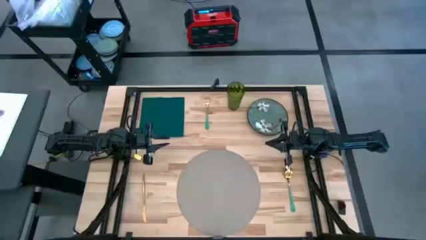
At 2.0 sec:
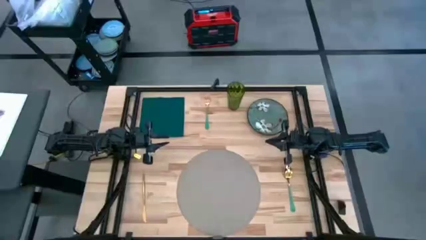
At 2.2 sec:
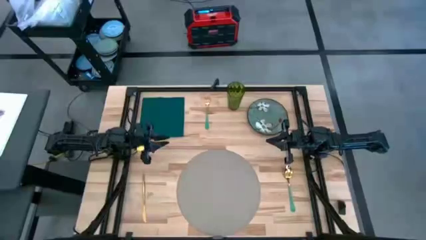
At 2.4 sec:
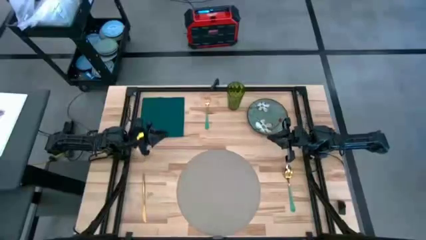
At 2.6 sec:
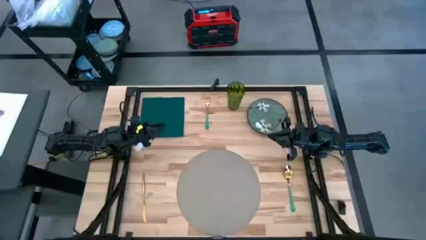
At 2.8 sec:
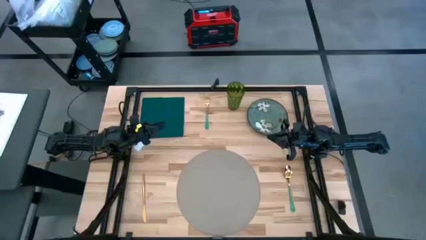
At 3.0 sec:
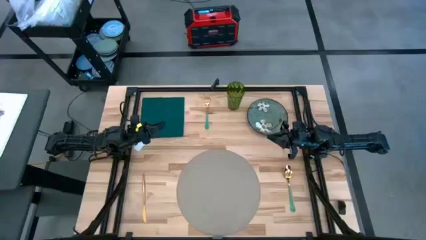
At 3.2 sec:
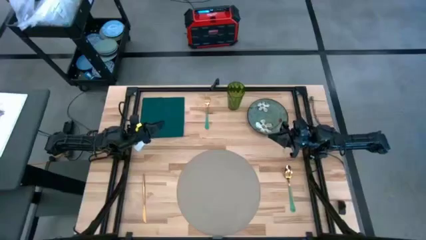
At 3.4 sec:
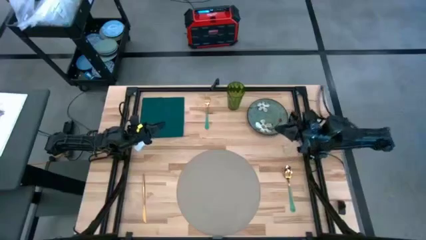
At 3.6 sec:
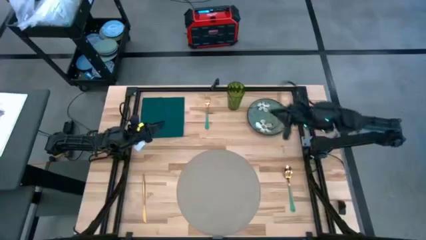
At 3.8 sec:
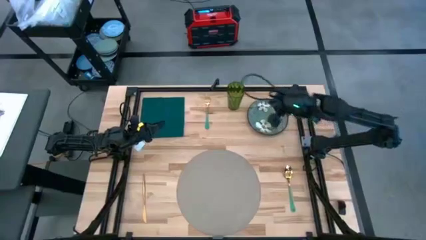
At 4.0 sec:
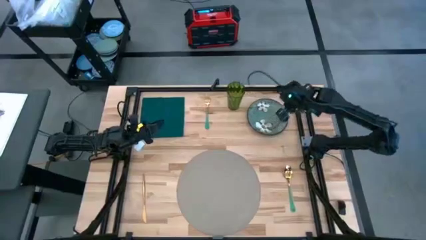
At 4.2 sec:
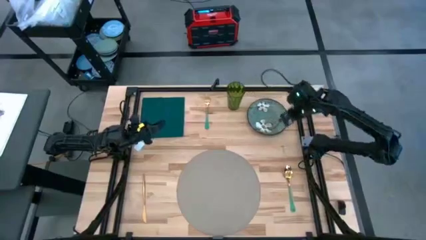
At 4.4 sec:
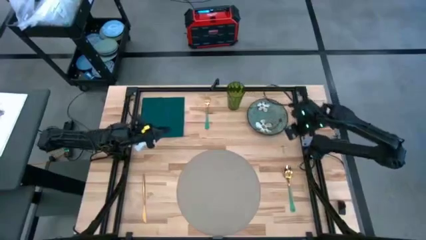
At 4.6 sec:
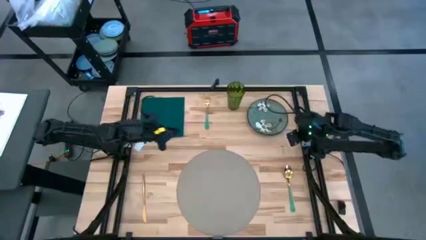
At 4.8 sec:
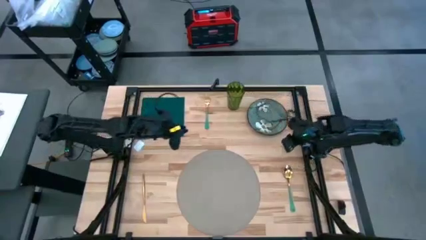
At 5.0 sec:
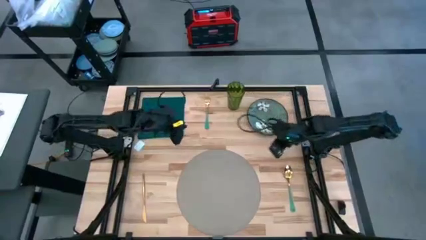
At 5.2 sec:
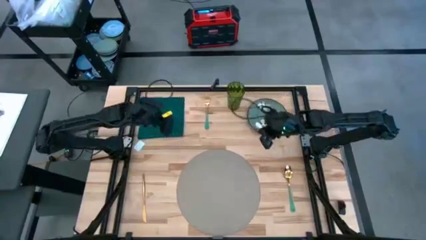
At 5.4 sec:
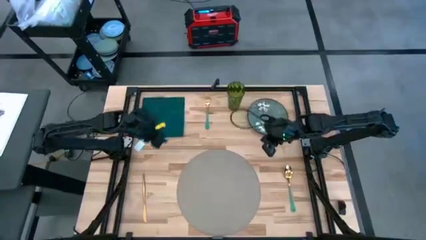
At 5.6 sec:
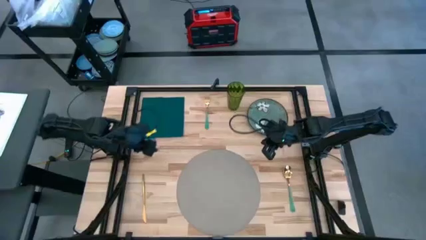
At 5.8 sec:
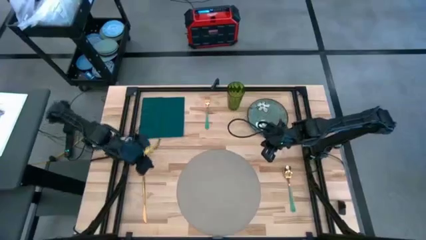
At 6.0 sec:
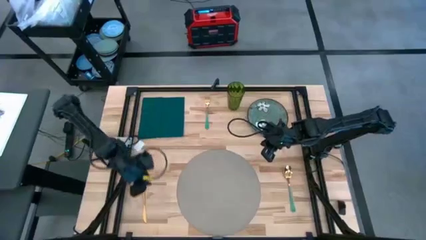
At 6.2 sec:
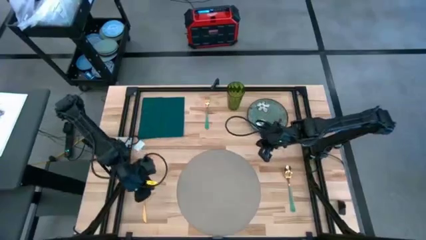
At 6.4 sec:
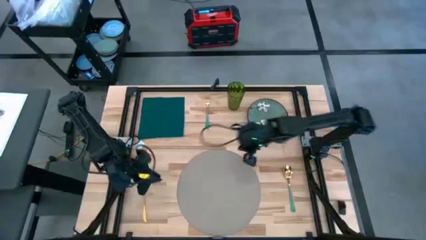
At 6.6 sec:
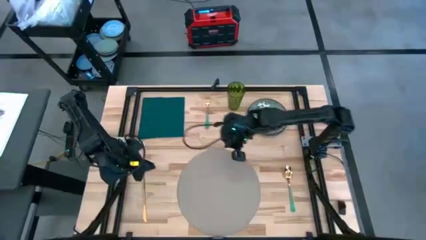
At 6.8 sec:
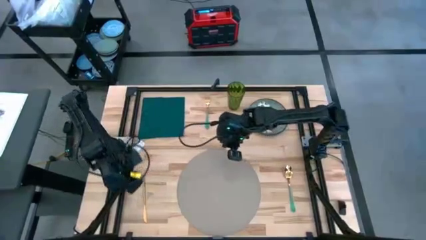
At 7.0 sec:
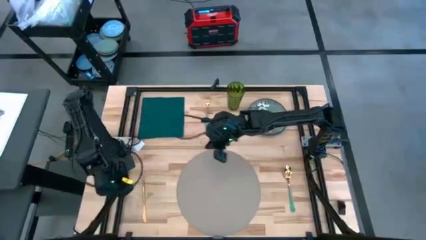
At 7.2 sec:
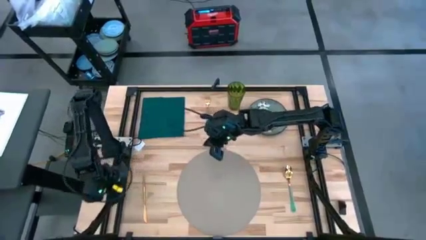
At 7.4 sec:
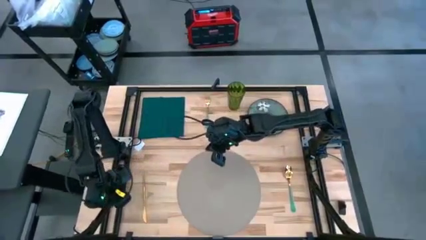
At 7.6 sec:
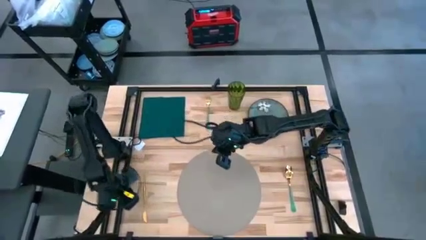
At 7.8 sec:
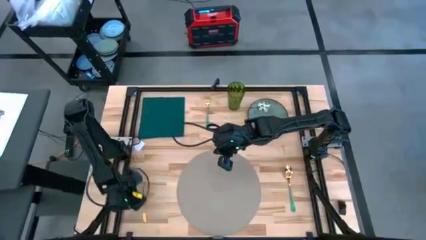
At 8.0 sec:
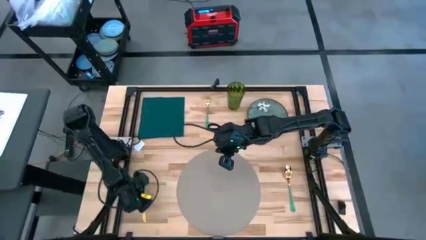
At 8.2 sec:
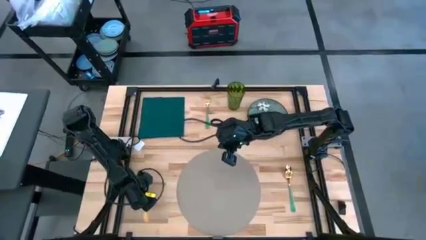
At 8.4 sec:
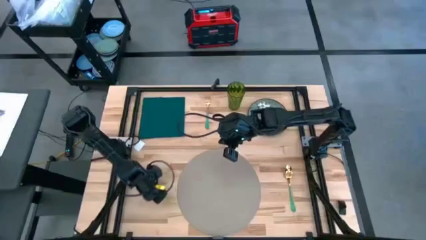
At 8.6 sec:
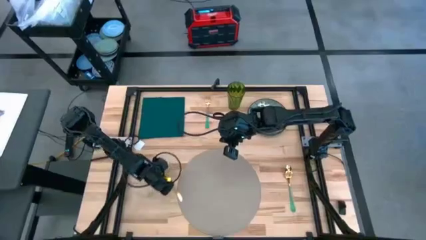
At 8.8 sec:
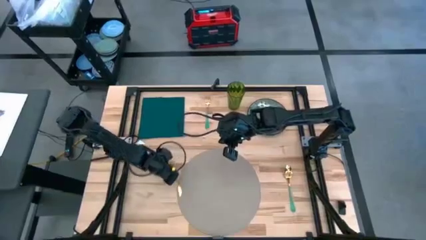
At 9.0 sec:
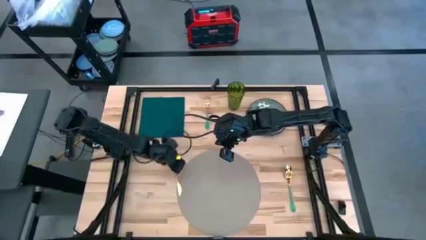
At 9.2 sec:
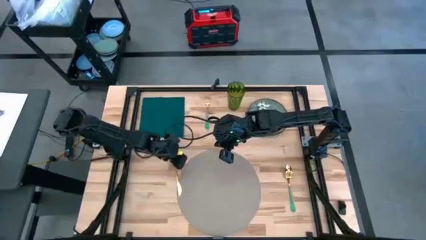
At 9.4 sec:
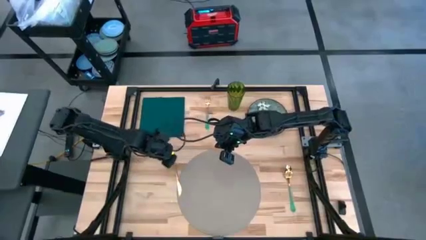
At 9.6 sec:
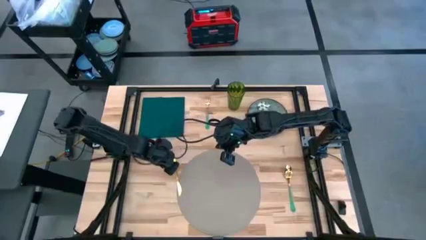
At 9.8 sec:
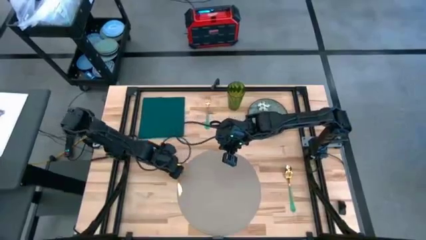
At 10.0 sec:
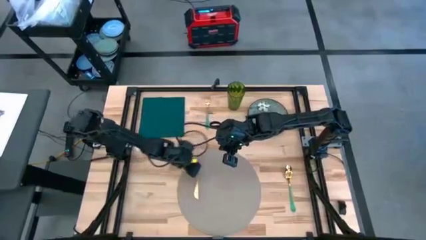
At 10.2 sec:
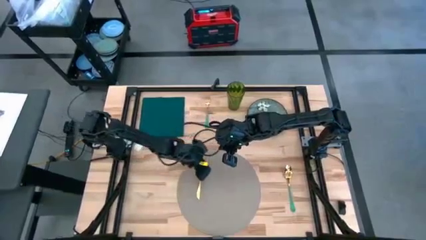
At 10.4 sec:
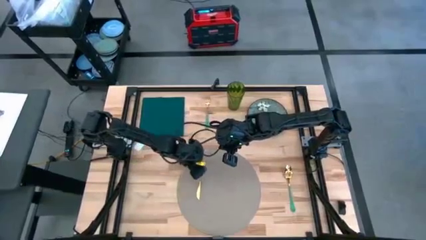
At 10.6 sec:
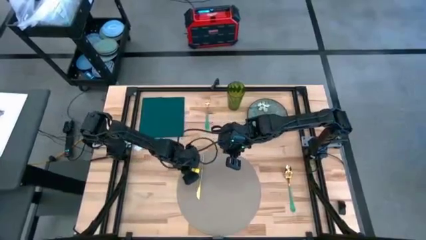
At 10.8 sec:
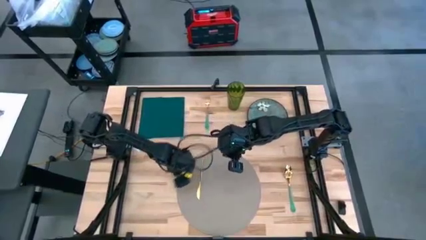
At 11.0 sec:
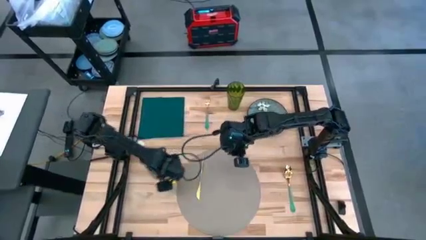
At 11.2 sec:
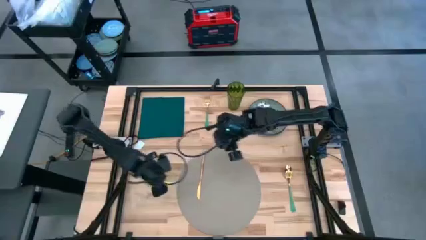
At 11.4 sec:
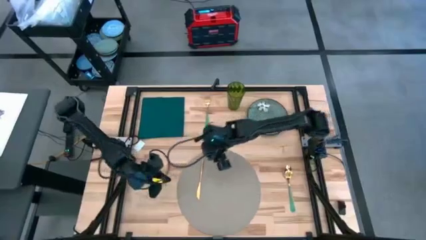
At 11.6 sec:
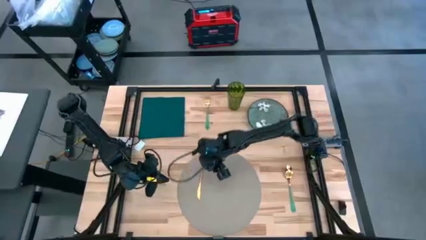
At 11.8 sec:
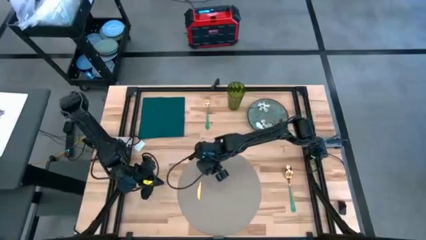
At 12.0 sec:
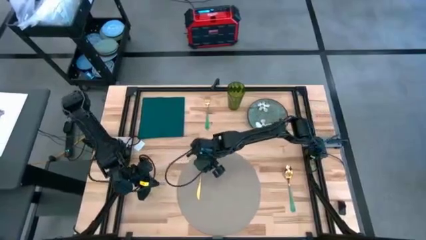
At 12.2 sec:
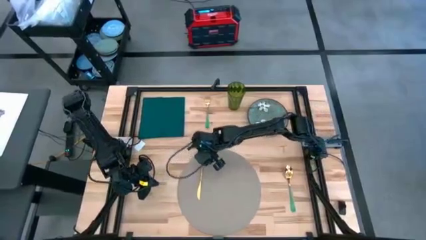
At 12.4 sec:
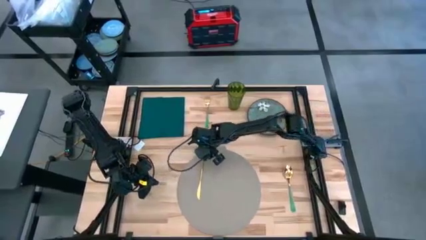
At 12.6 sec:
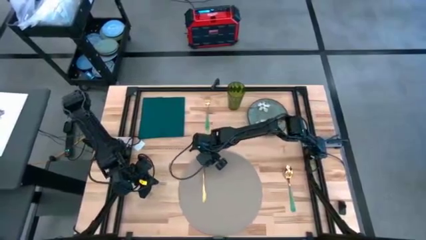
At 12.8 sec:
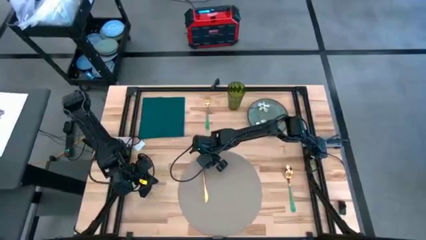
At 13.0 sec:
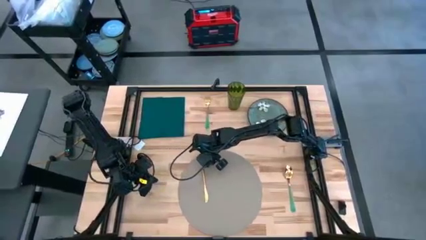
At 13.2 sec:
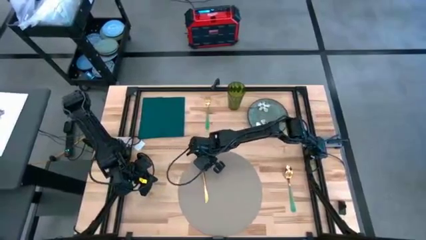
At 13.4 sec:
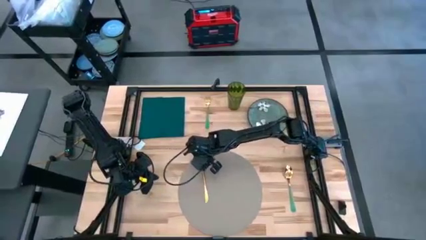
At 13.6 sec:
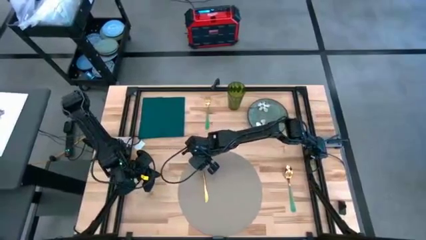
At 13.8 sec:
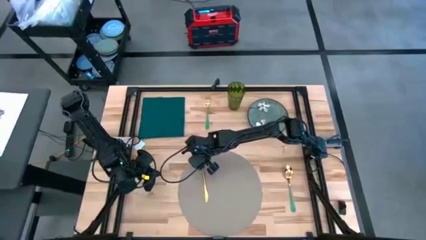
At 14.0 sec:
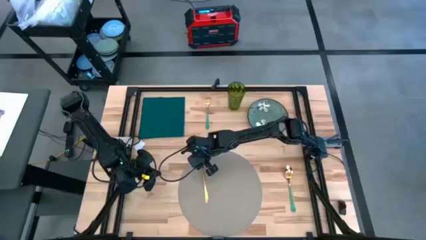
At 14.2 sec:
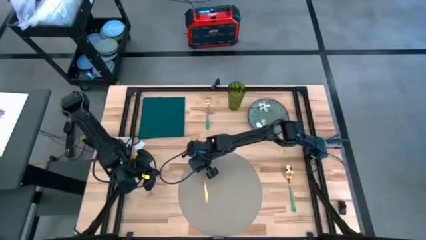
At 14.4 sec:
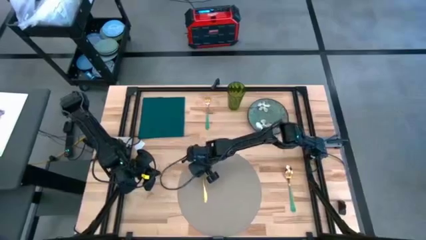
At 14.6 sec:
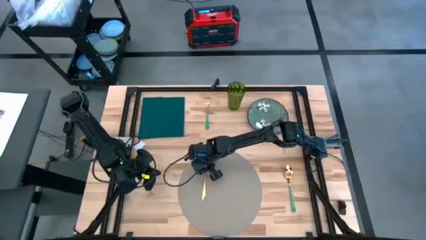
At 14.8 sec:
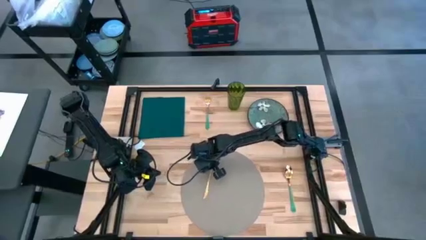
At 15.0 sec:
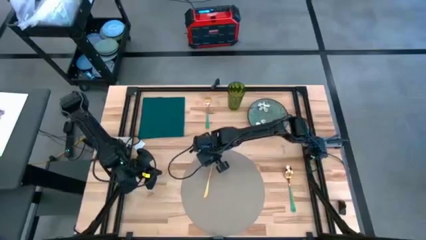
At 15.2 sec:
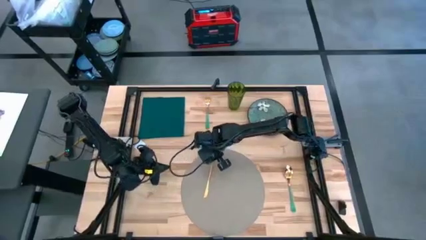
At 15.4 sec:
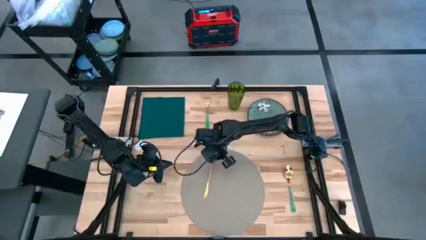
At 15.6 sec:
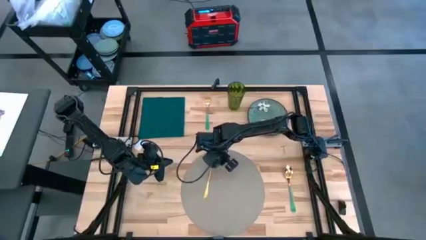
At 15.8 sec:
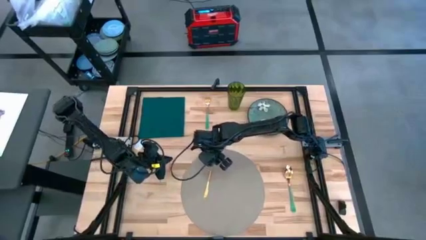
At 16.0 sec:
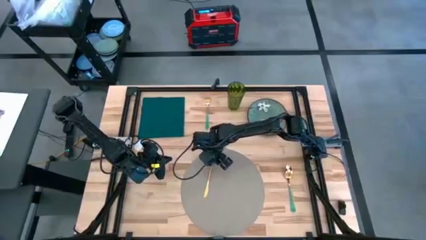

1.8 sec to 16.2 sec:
Task: Set table place
Move the knife on the gray placemat
